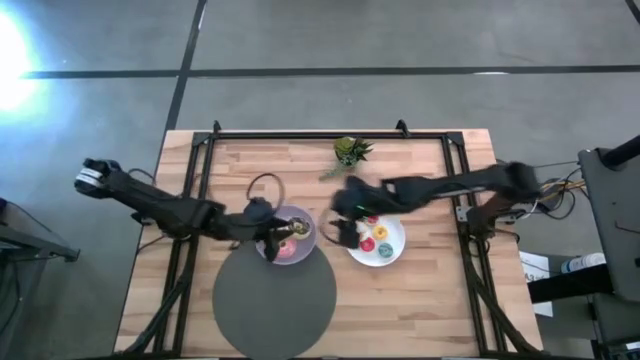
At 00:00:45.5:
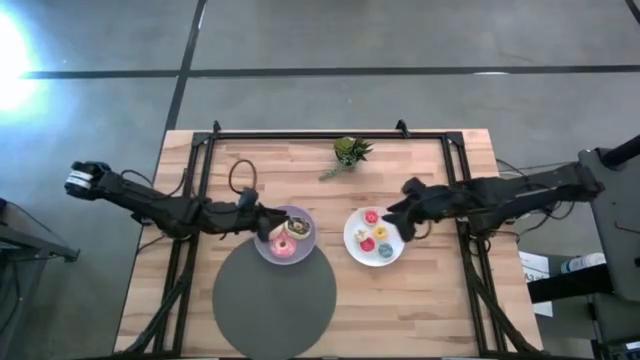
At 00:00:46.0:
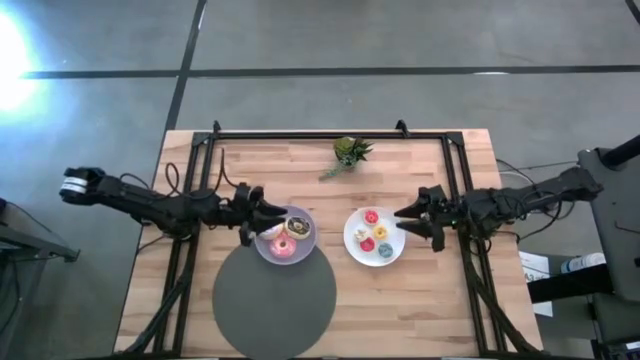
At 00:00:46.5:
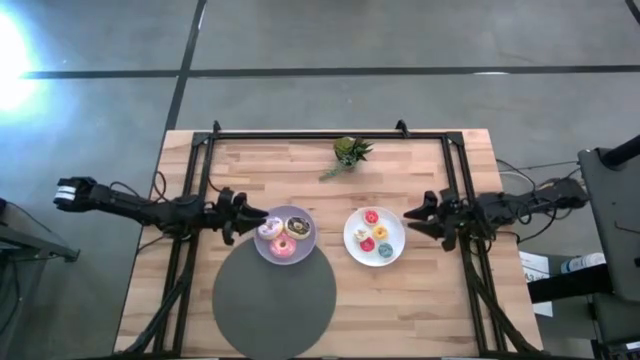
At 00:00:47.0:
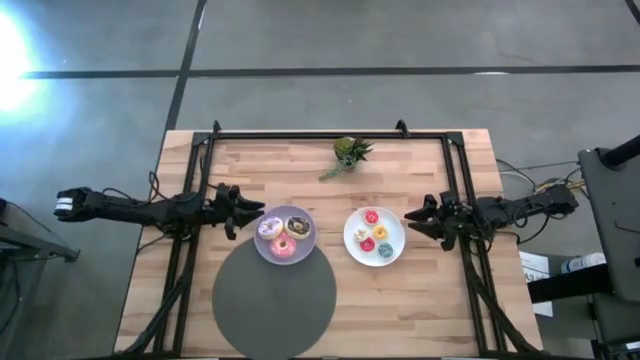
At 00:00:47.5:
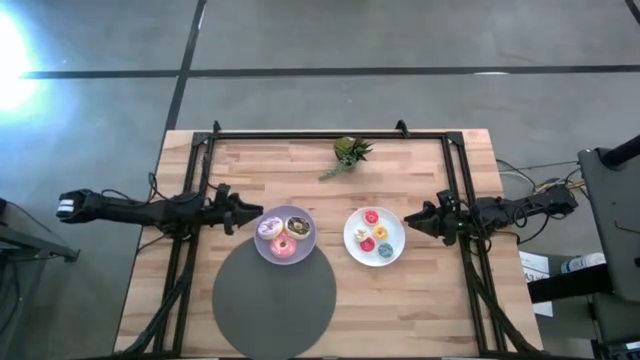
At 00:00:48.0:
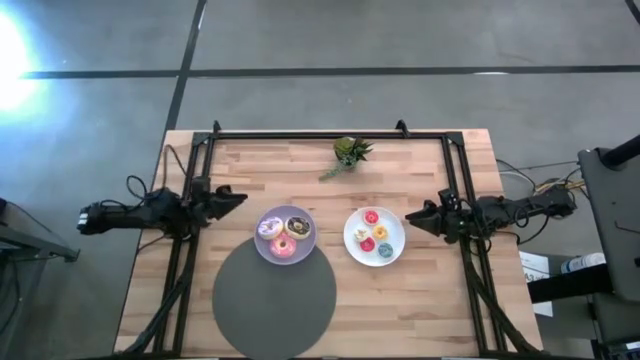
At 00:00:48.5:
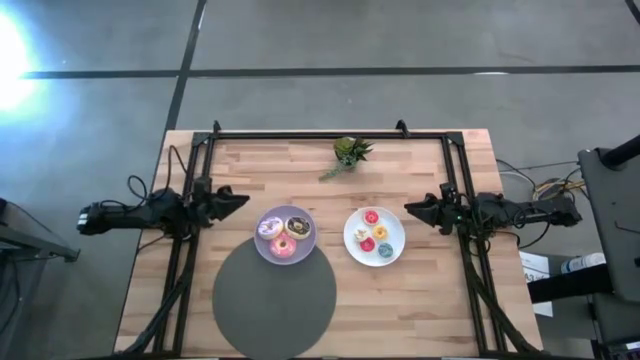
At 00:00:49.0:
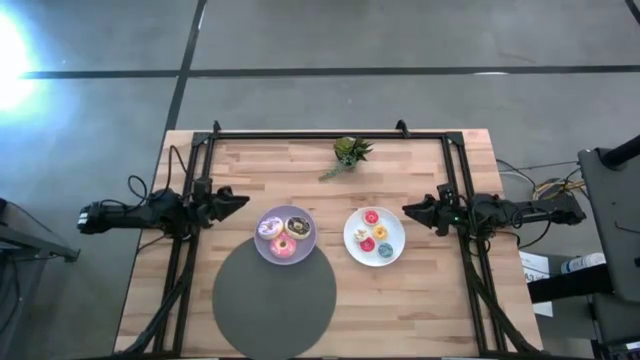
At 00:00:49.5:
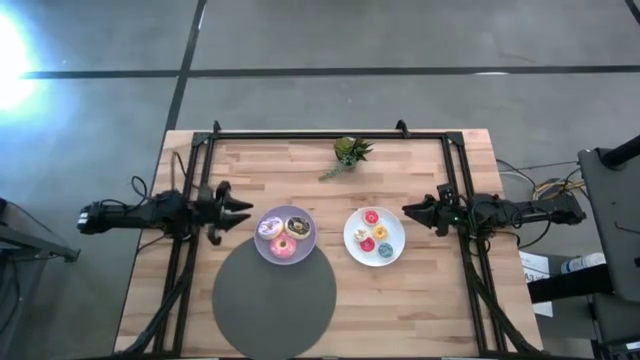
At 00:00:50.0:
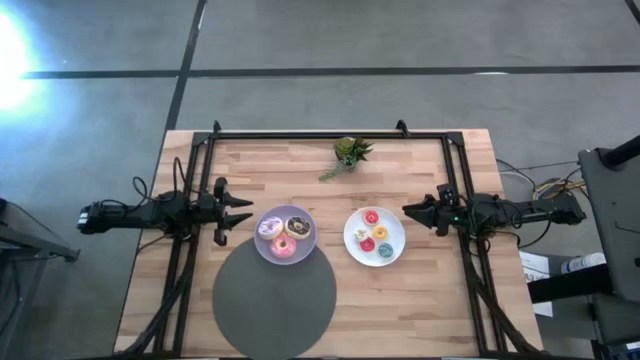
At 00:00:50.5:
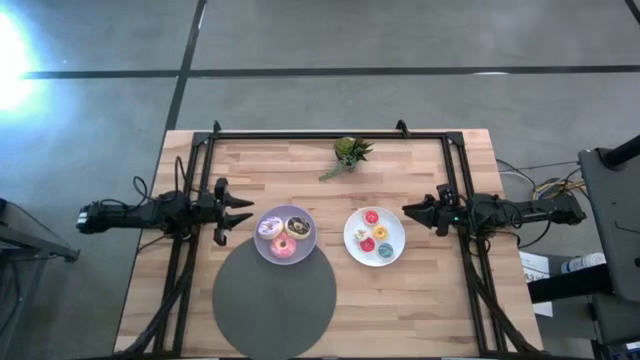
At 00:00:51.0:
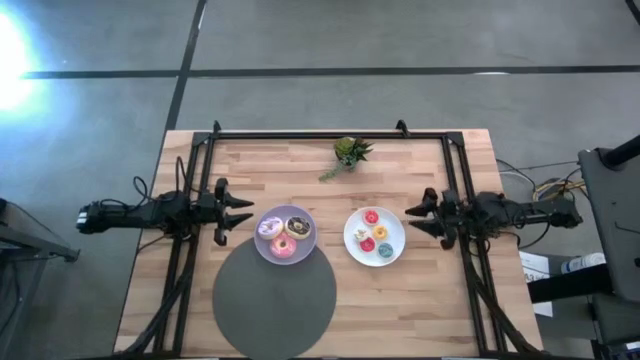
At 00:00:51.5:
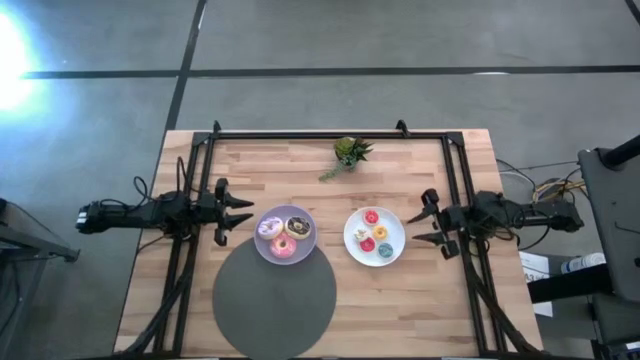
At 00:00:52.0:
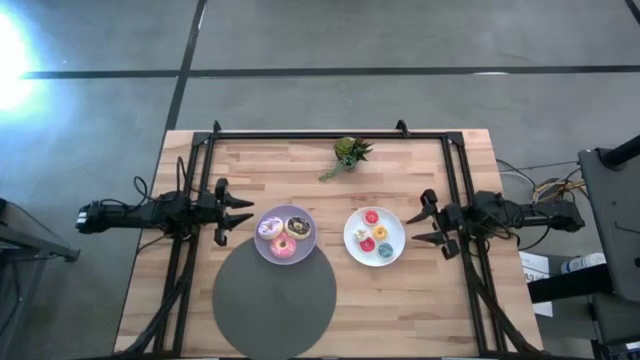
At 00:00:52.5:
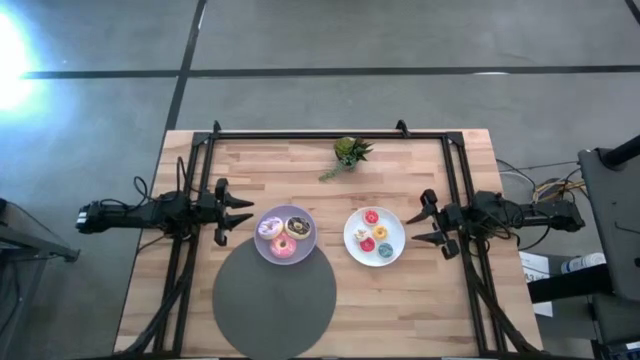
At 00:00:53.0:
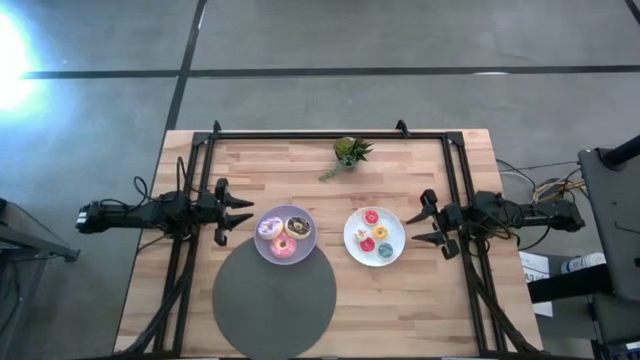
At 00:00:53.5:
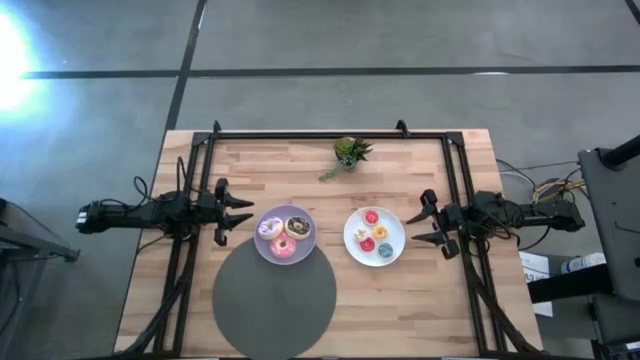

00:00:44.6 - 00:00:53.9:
Task: Pick & Place donuts
Return to Home Position

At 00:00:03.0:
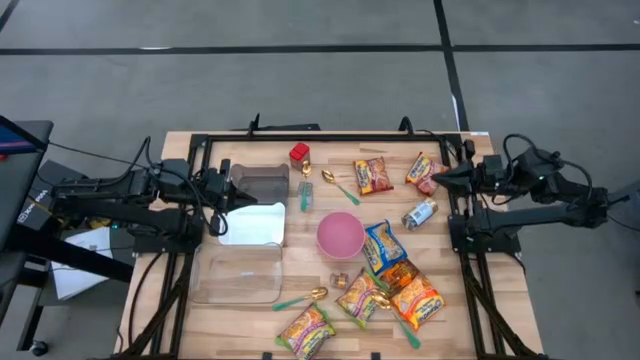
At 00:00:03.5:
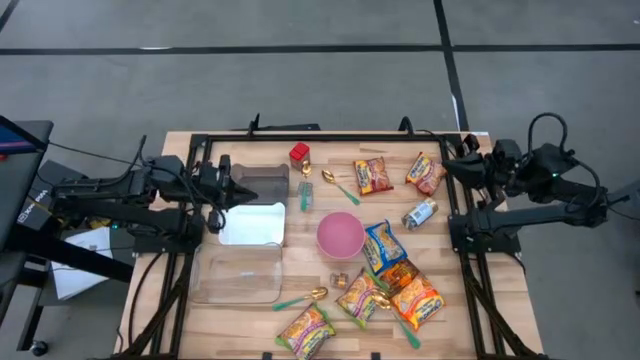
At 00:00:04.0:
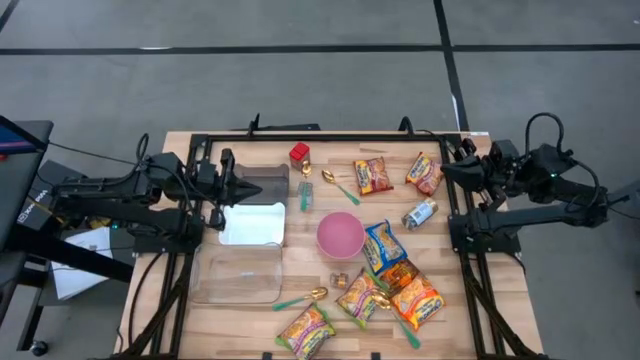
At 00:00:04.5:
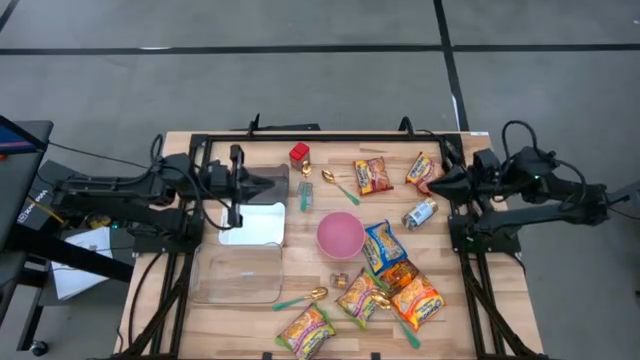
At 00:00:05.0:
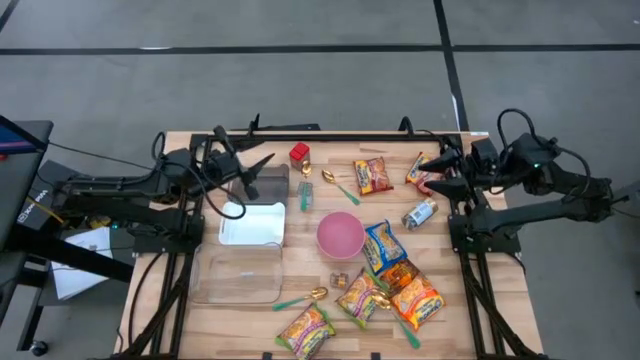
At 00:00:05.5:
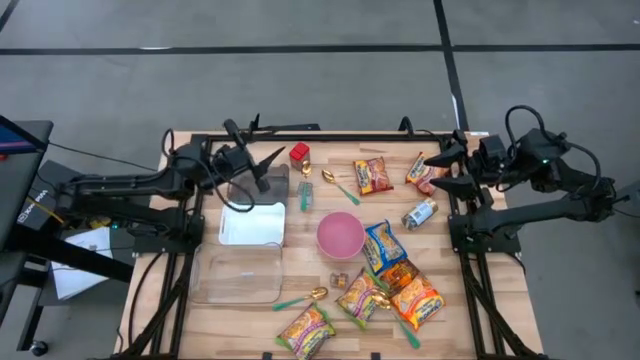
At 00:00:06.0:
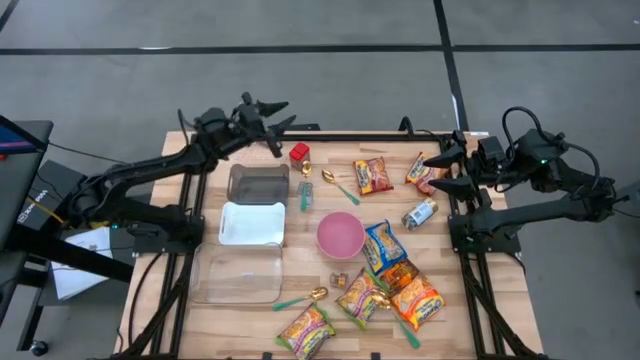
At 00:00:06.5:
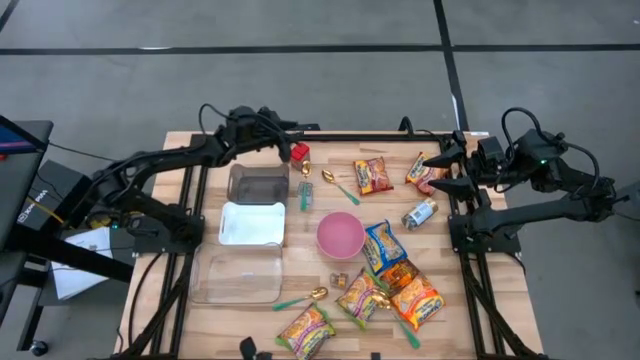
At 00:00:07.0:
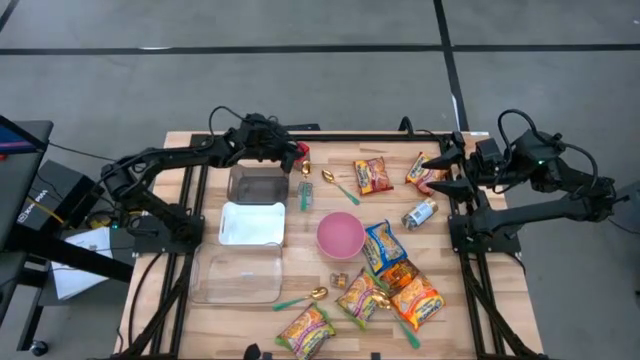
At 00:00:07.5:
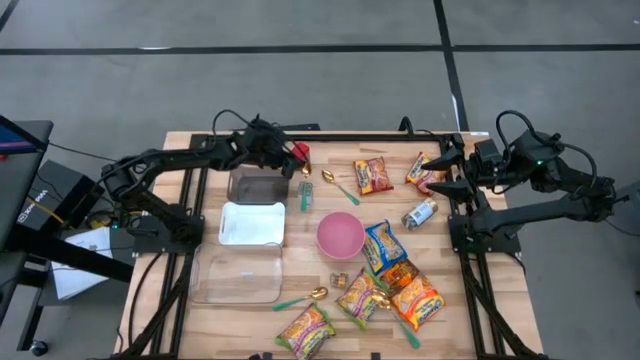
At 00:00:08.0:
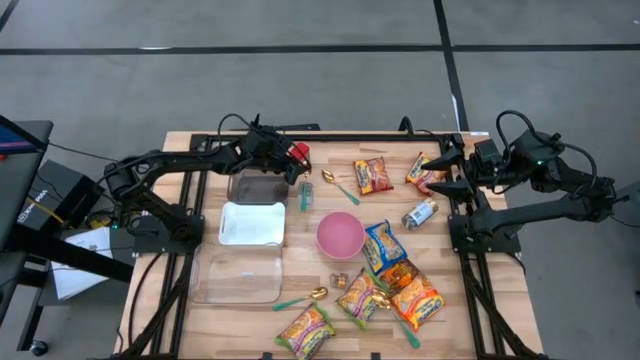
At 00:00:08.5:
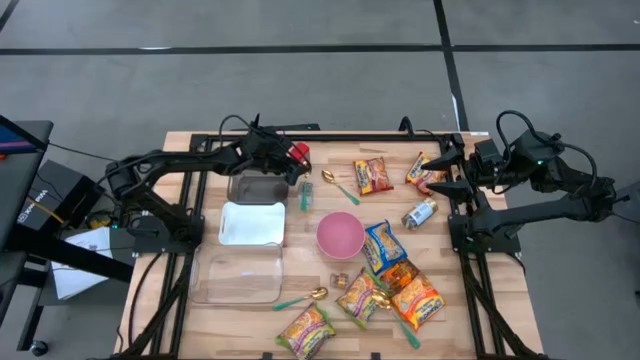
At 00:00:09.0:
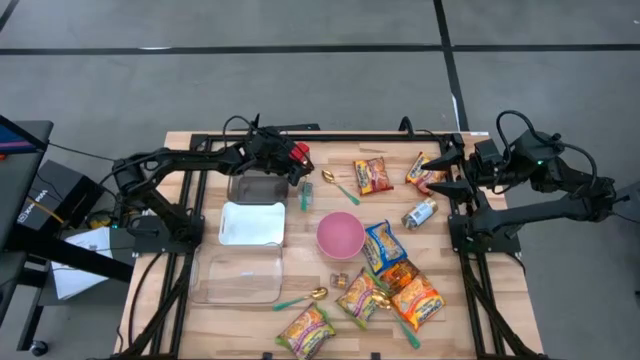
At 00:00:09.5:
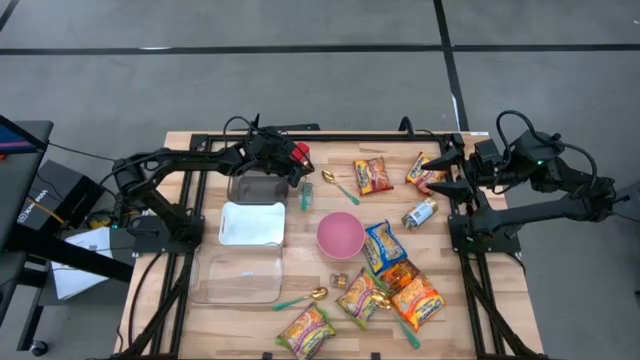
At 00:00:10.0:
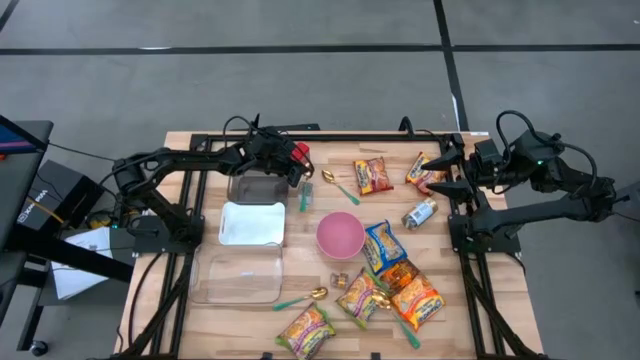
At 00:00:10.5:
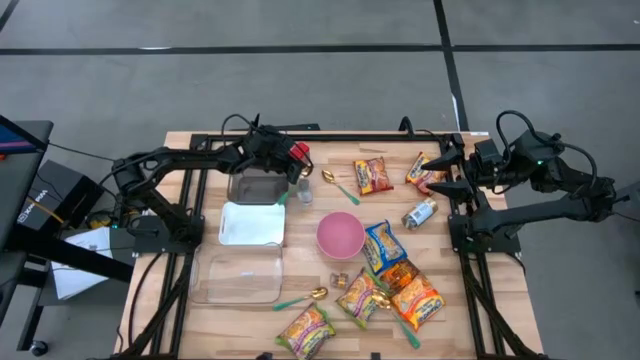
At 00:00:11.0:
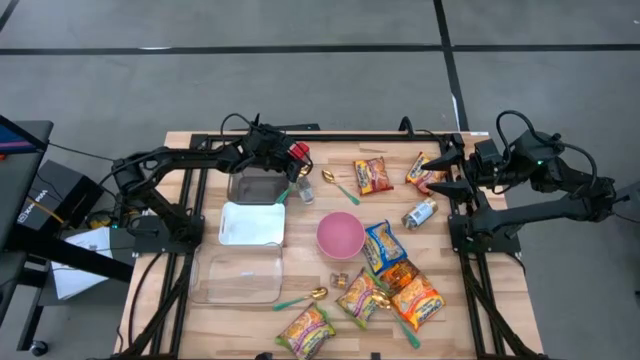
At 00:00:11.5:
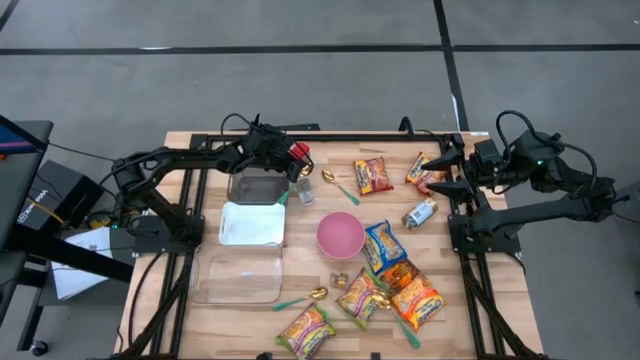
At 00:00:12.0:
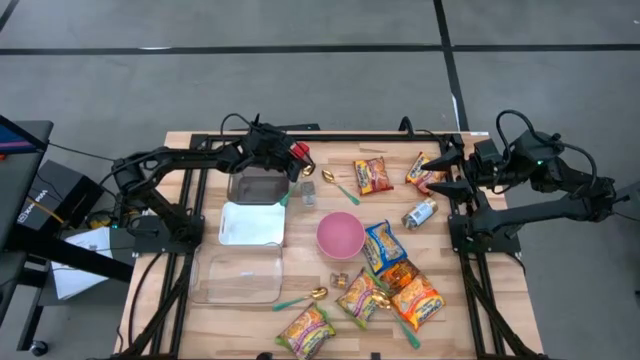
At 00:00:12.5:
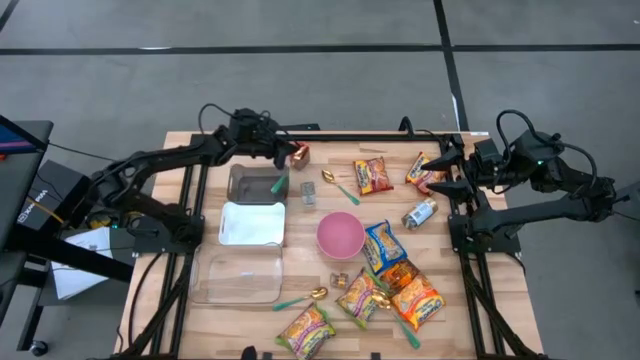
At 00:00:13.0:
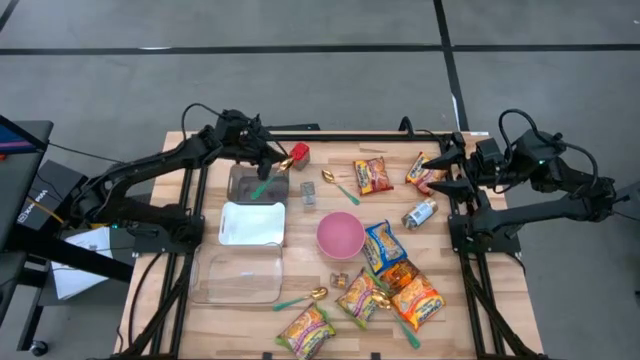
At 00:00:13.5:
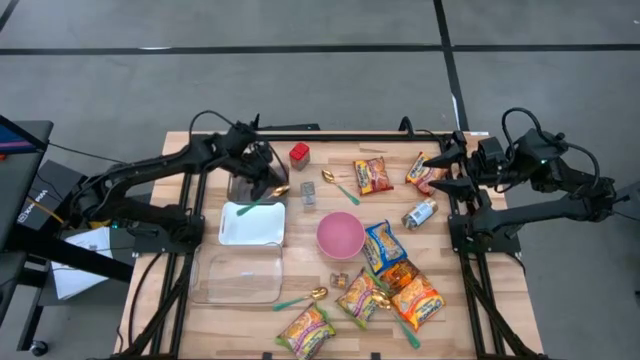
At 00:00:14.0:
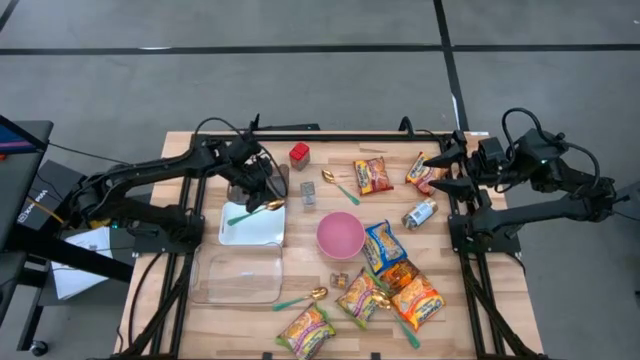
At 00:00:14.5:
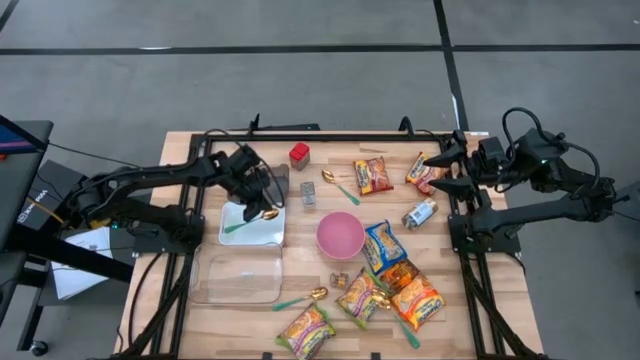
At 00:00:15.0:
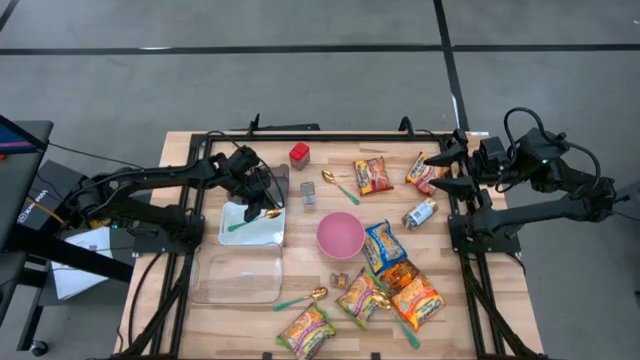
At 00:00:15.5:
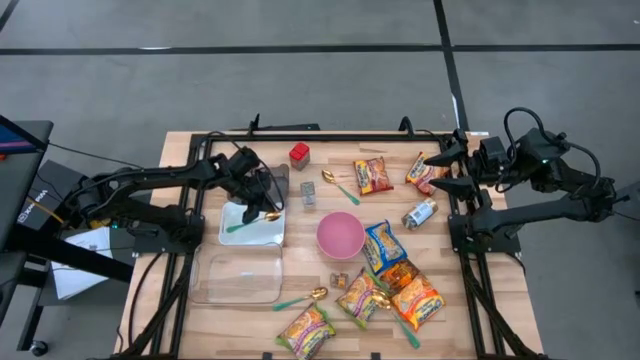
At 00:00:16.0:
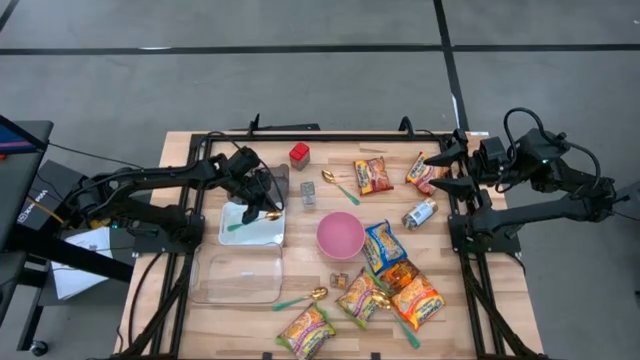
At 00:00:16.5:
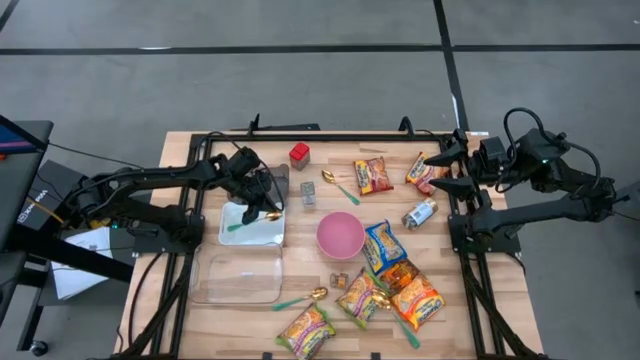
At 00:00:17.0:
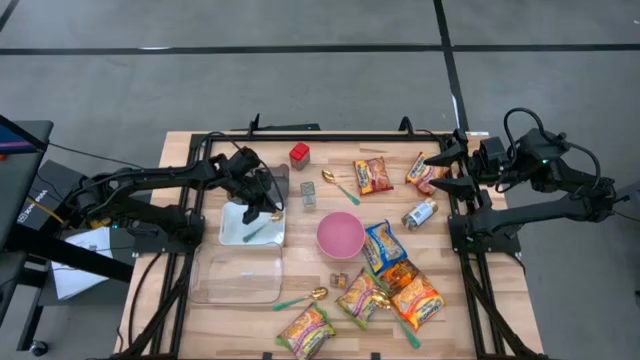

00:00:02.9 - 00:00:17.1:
Task: Pick & Place Food Item
Put the green spoon into the white bin
